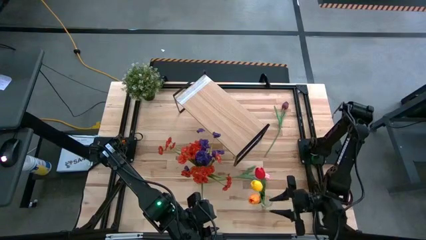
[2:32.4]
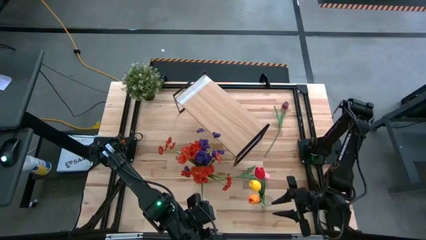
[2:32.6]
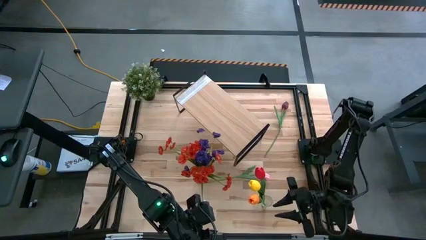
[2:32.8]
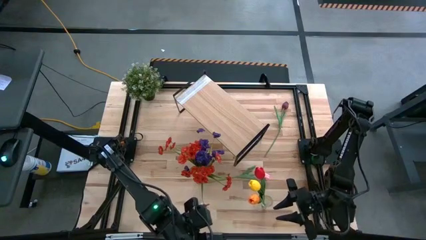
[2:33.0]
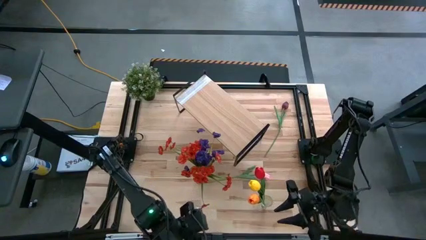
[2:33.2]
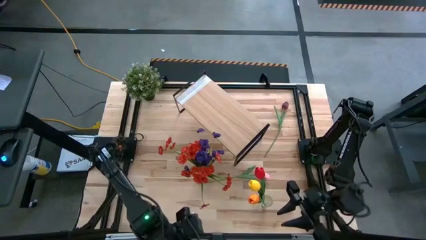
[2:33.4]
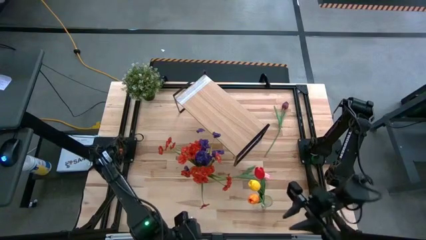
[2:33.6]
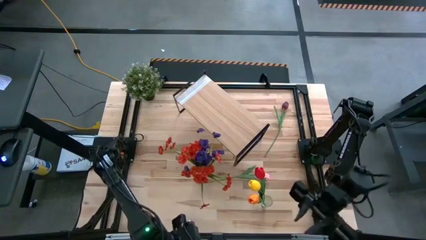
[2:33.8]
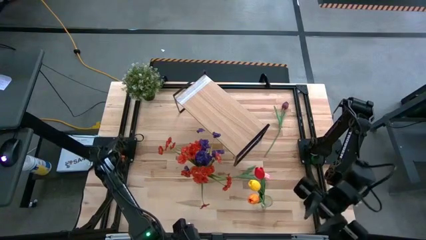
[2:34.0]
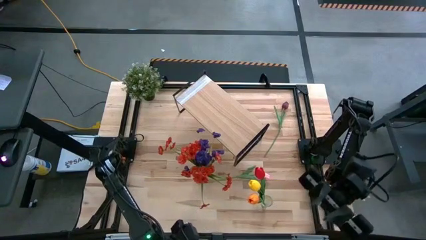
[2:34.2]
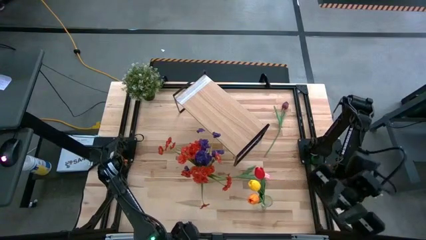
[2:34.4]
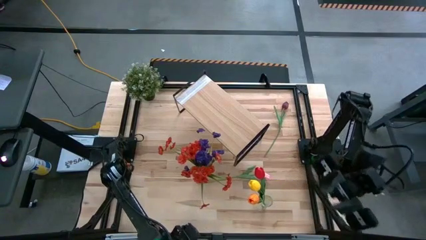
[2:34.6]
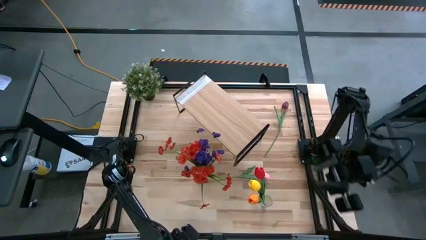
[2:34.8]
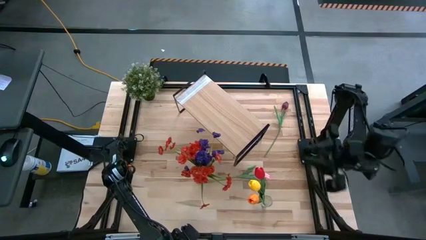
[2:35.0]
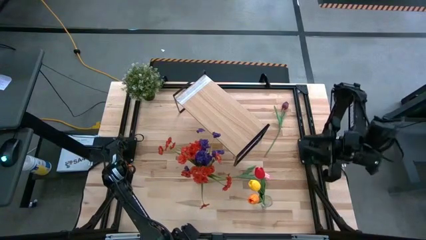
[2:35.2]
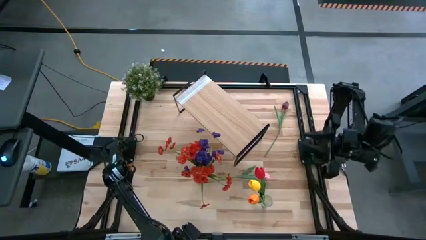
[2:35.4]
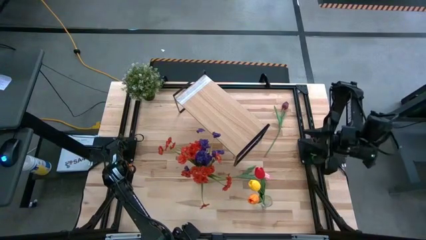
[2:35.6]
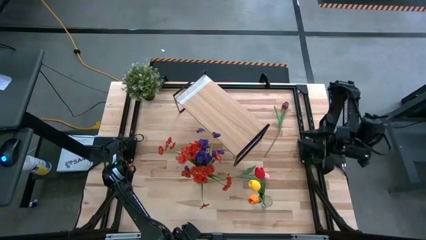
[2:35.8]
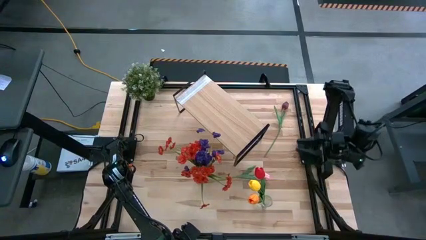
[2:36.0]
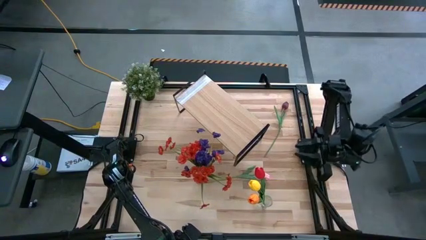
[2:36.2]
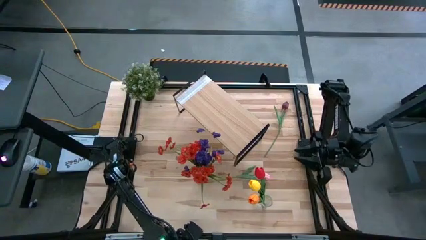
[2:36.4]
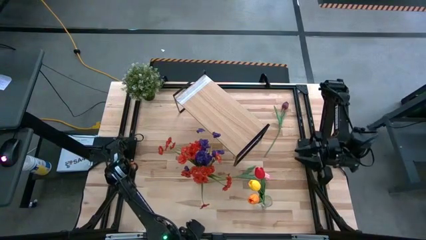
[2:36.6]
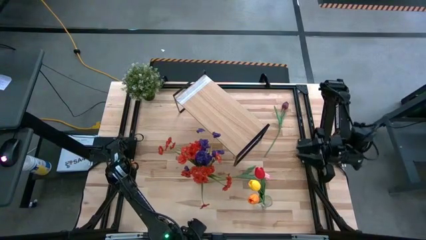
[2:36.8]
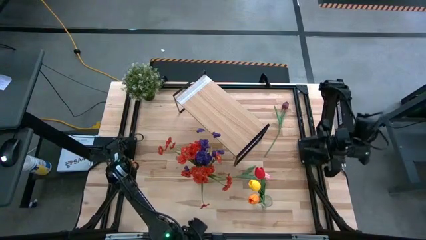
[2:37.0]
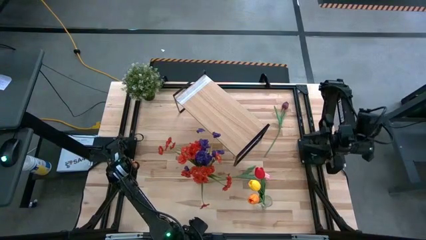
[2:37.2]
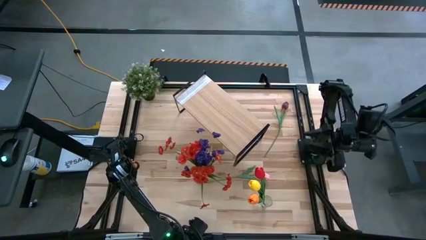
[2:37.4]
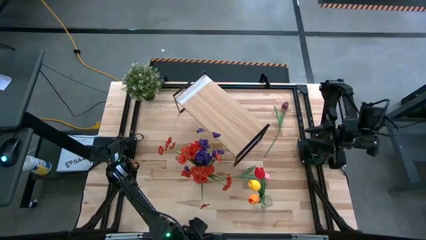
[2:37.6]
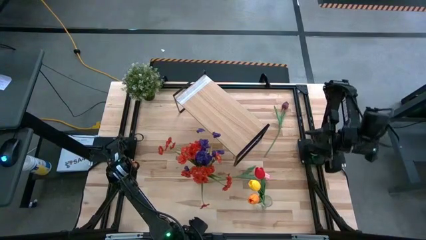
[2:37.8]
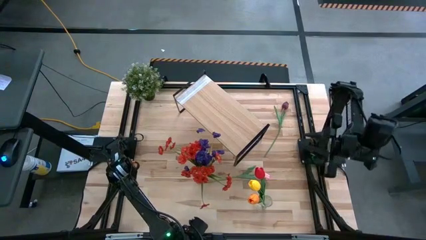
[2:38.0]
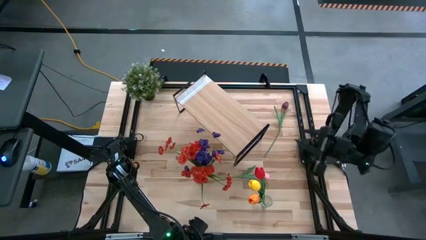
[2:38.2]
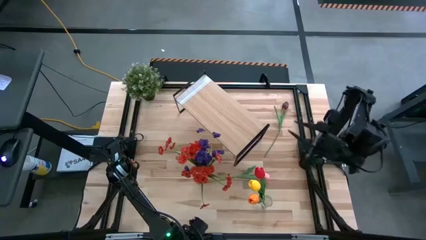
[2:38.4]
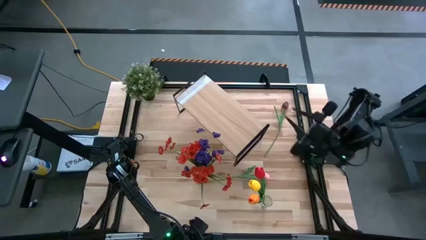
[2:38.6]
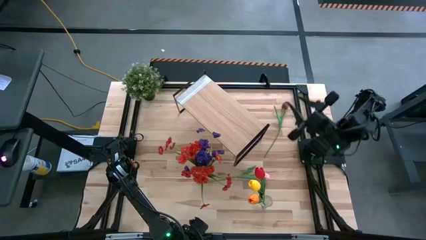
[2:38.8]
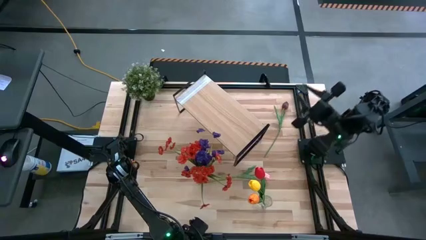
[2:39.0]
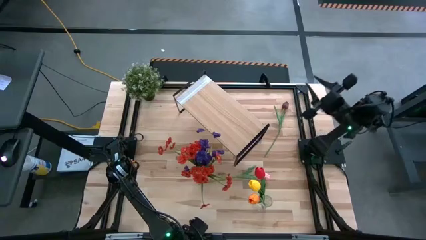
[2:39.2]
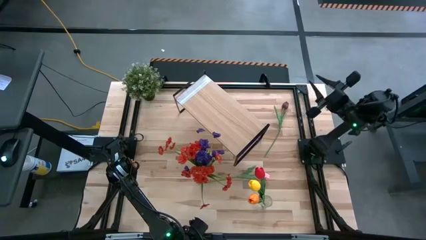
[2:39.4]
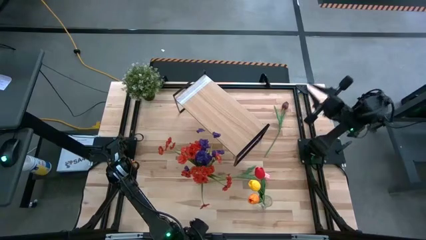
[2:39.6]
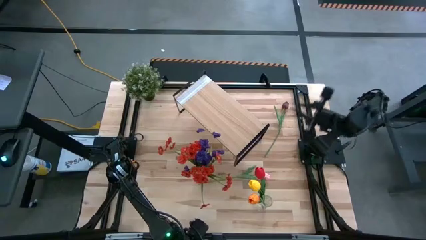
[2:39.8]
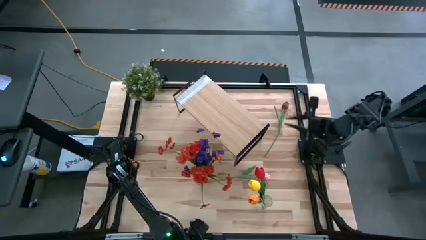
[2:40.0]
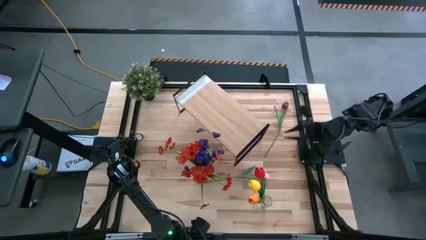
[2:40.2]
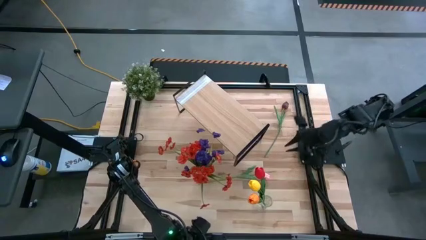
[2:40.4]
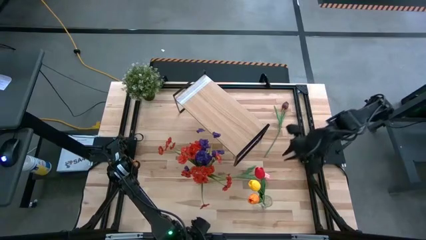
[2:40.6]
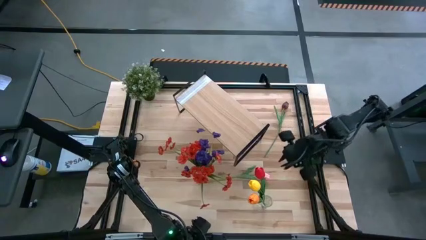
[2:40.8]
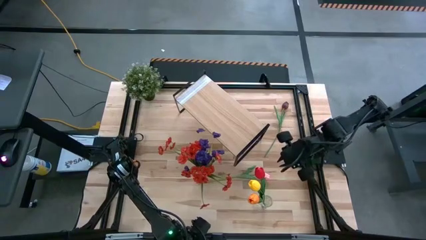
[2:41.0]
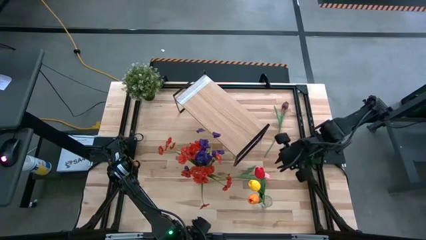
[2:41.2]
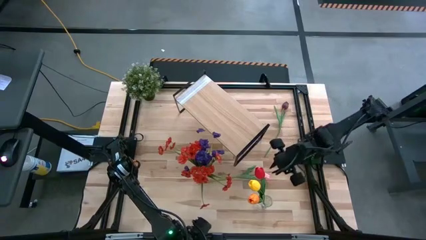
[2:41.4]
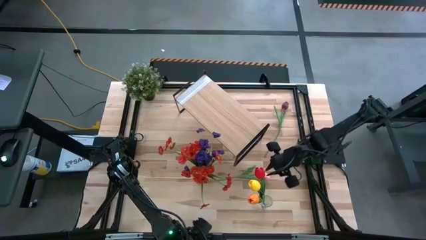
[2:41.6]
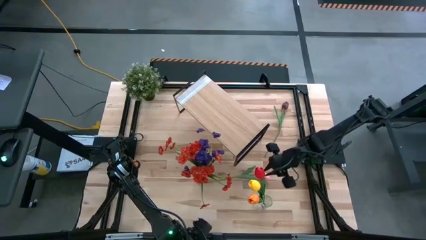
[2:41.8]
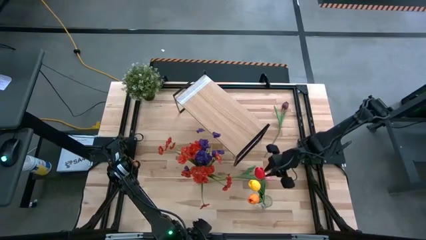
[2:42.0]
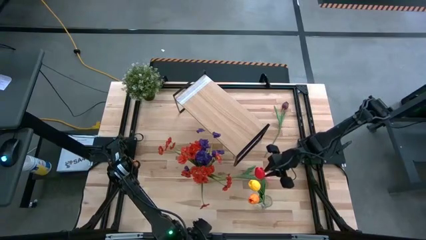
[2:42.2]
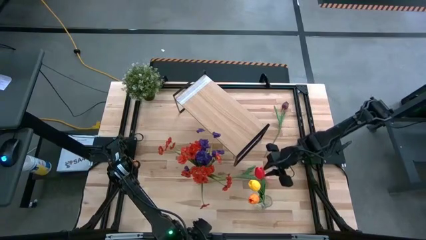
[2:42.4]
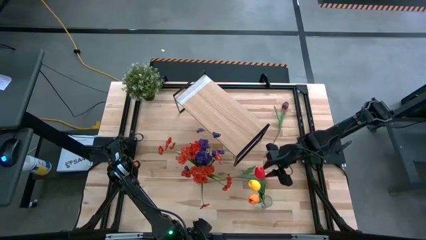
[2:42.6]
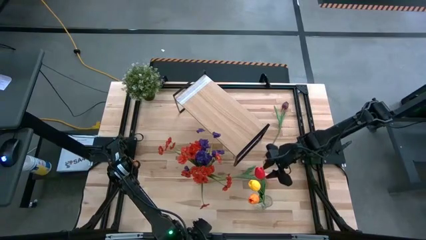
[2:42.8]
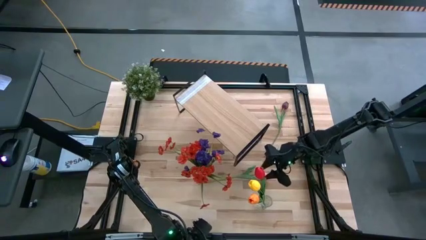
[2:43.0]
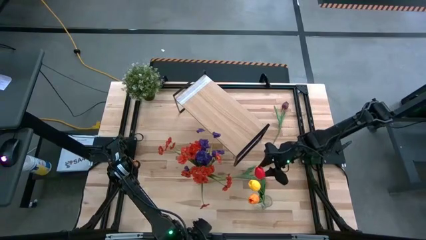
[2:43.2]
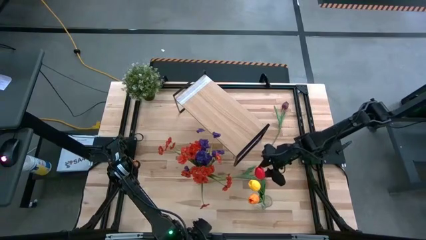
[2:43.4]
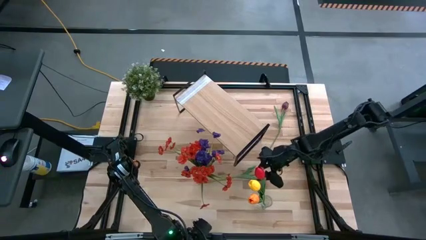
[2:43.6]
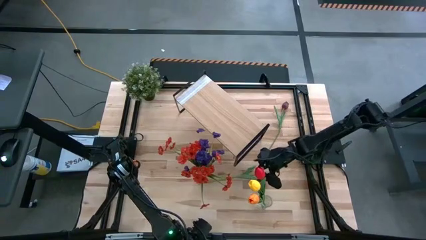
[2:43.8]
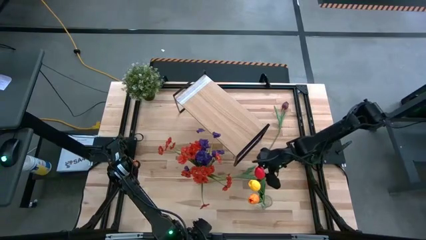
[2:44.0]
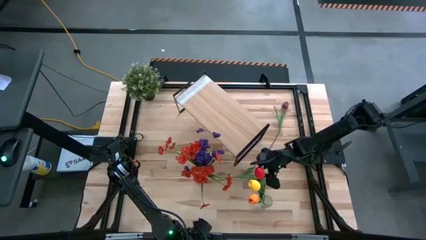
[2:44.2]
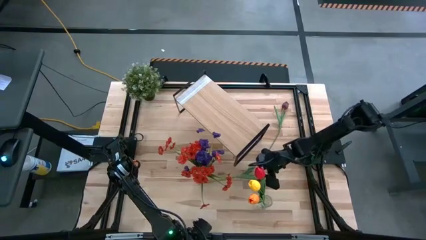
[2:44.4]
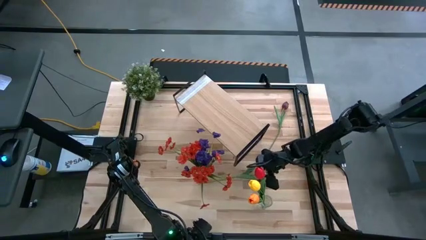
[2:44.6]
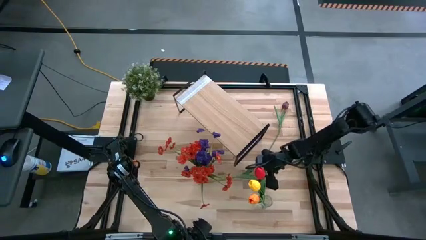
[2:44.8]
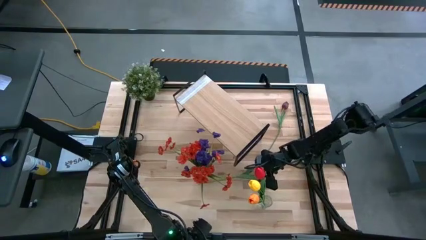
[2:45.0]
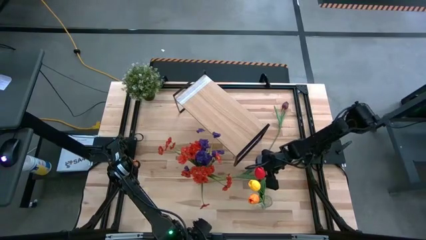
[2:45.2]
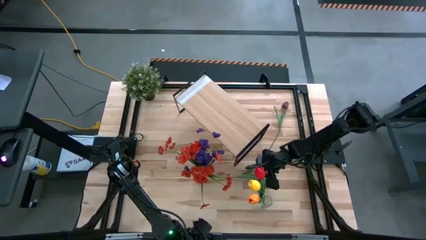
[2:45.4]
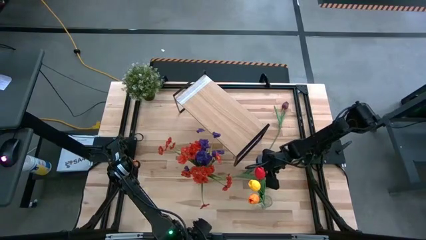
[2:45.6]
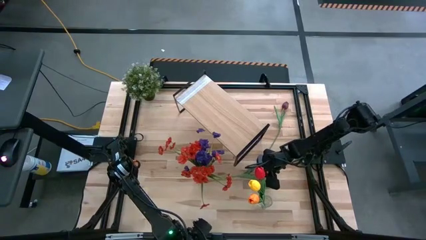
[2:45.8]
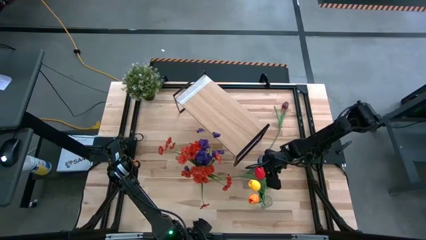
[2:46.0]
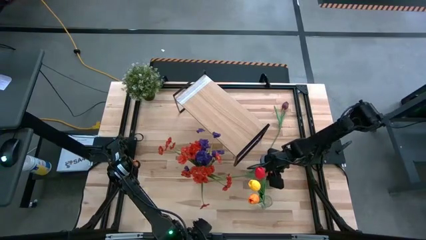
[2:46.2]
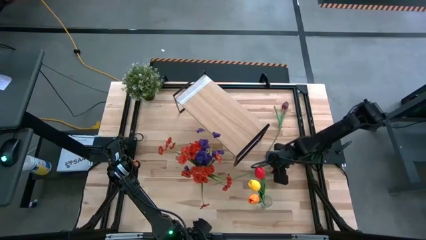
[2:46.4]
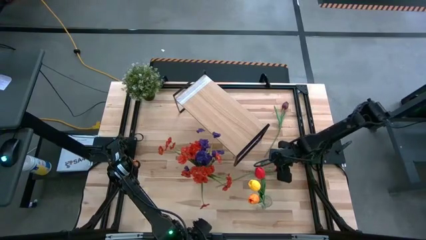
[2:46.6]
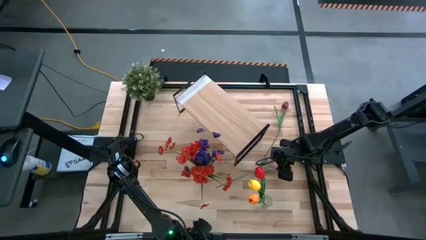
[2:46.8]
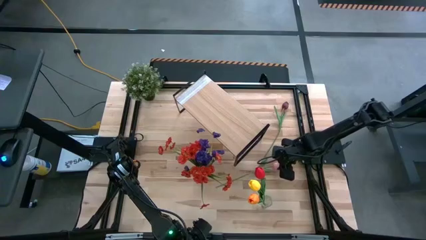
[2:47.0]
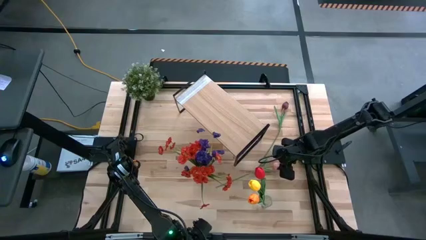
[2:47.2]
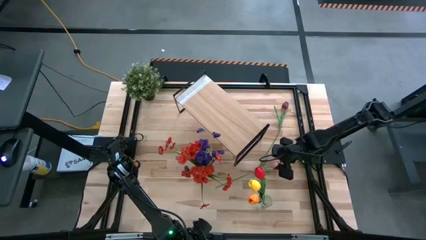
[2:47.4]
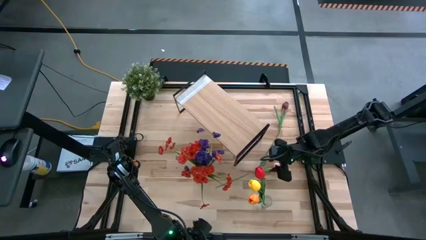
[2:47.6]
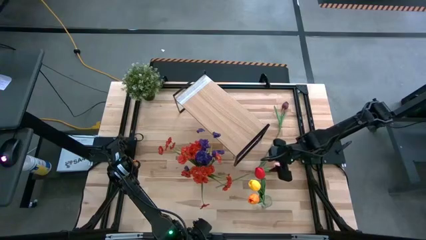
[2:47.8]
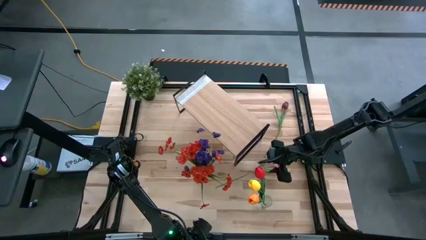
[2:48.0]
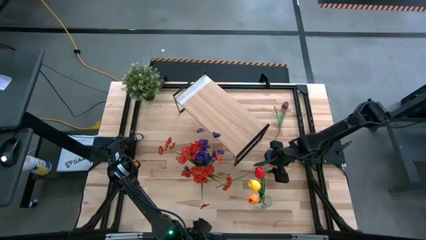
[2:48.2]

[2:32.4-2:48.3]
Task: Pick and place flowers into a vace then onto a shelf
Put the pink tulip into the right transparent vase
